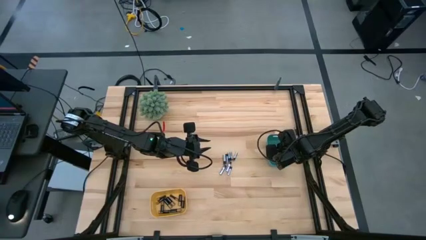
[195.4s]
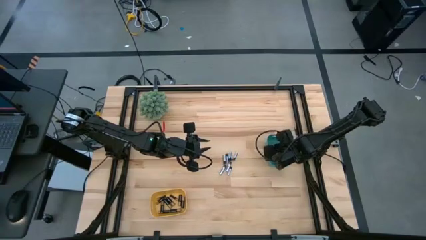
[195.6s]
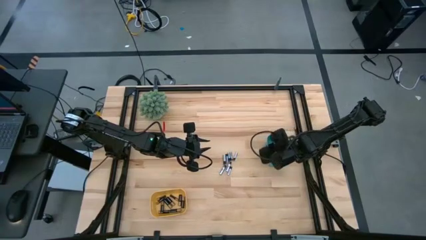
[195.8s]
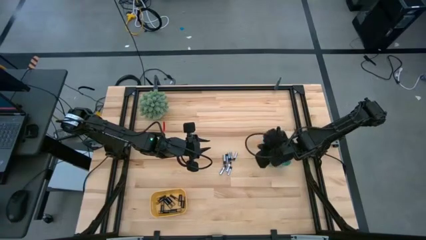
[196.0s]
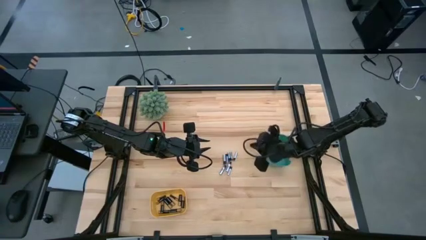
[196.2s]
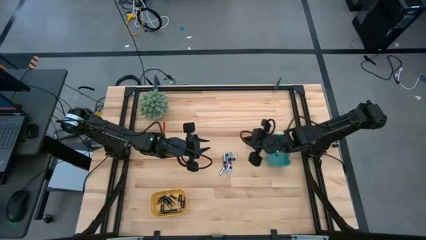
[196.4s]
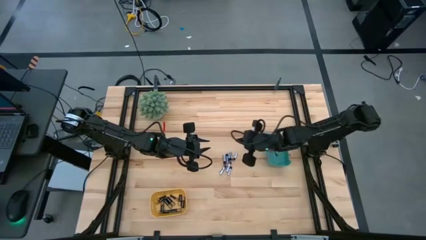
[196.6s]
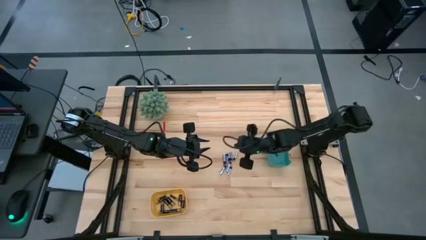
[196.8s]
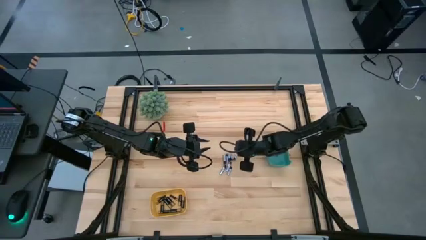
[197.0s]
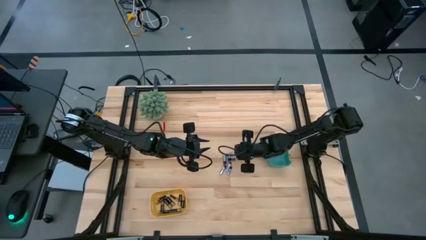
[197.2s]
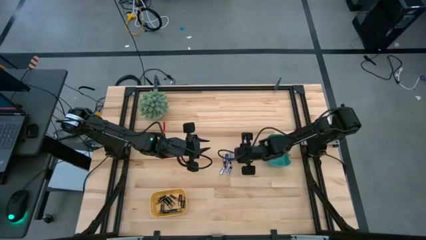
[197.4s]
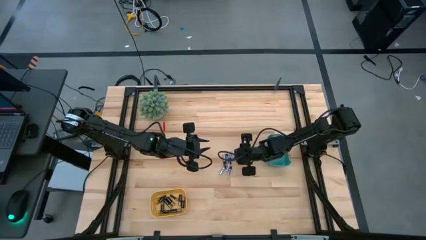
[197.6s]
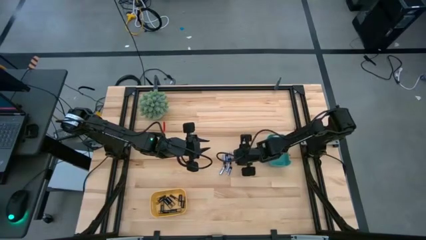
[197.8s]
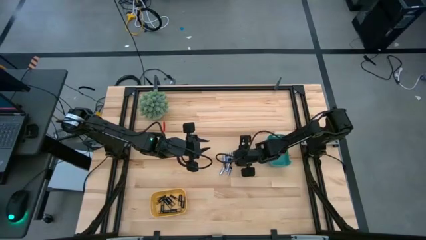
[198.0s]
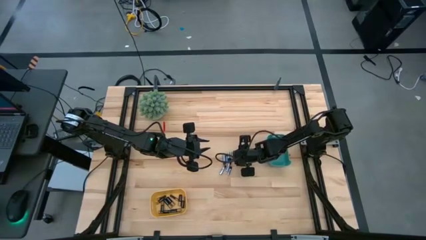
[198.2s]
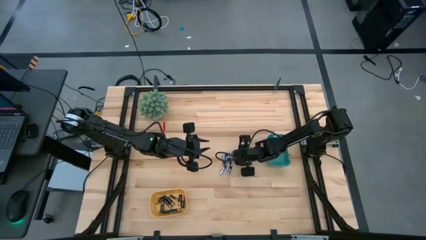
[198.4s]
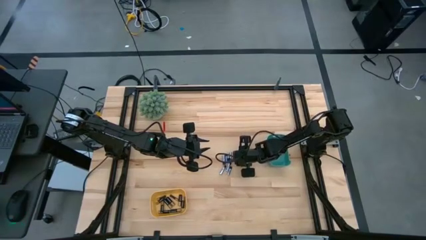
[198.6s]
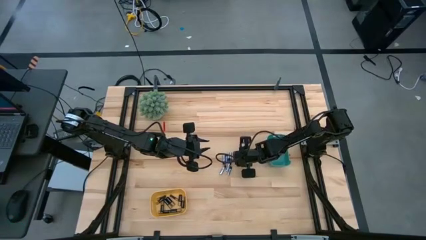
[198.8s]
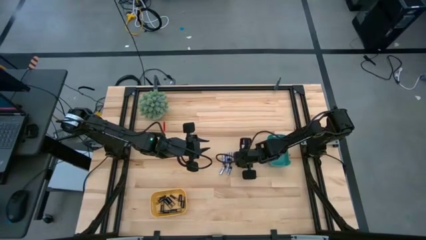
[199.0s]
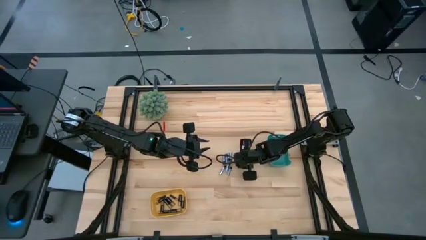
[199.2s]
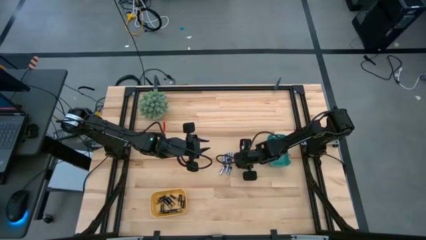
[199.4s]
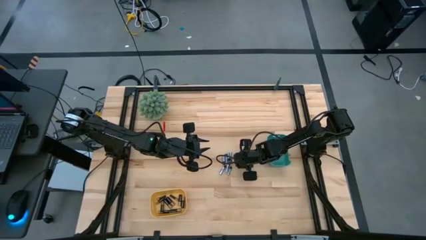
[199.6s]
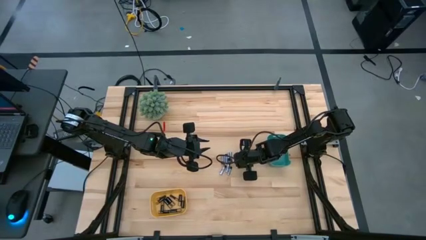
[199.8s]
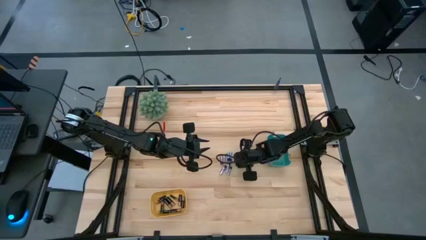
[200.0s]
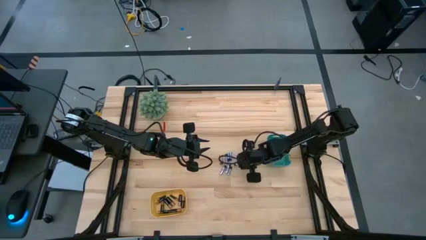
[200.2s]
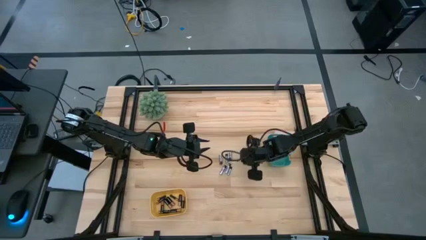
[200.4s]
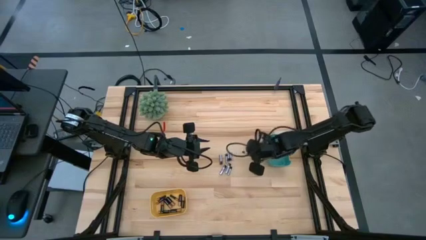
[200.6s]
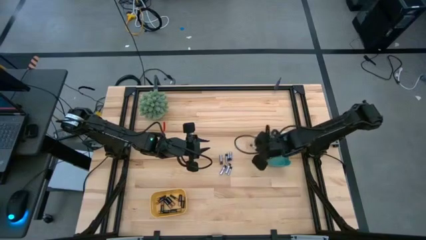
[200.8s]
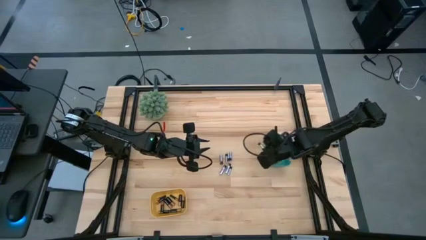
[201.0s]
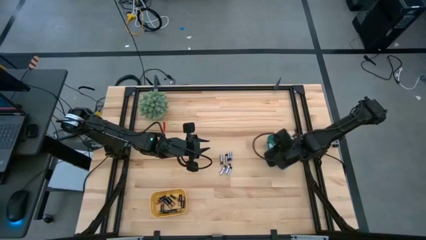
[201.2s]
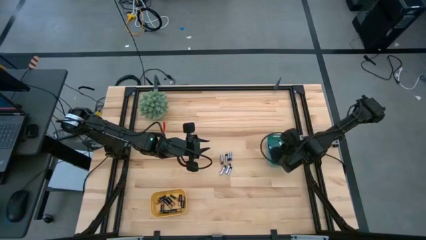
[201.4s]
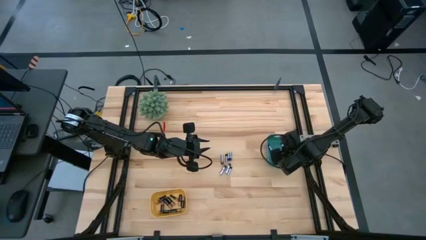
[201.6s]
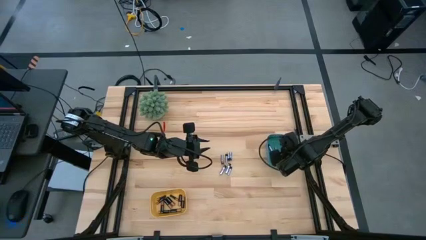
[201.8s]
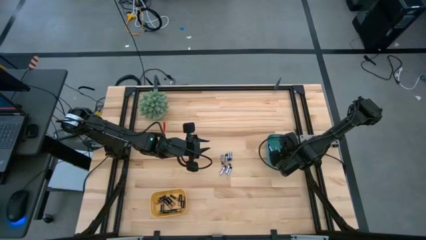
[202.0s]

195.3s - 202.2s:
Task: Sort batteries
Put the silver battery into the green bin

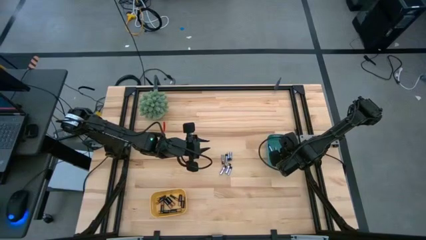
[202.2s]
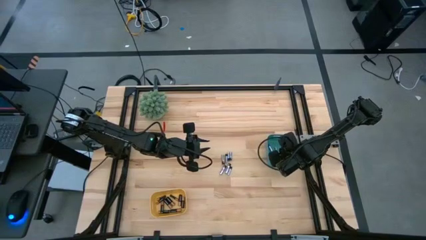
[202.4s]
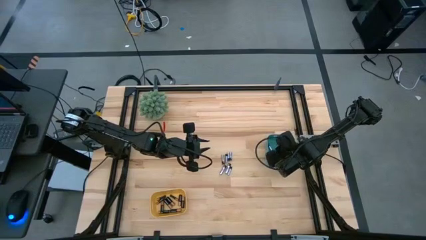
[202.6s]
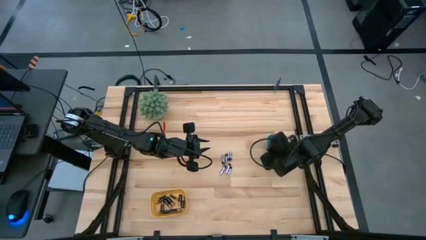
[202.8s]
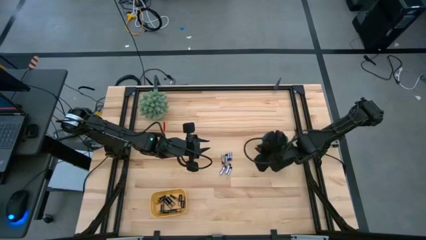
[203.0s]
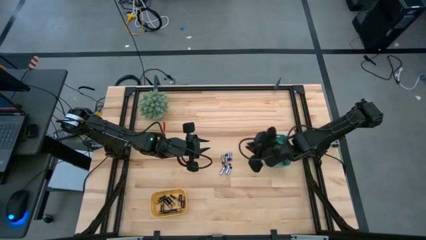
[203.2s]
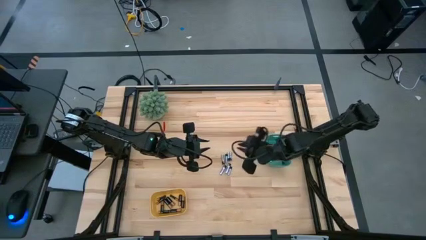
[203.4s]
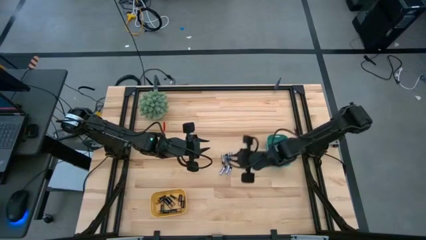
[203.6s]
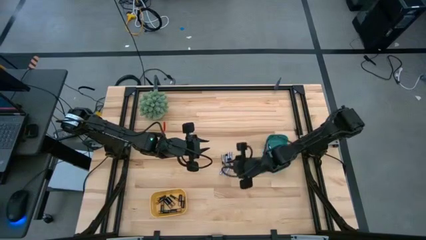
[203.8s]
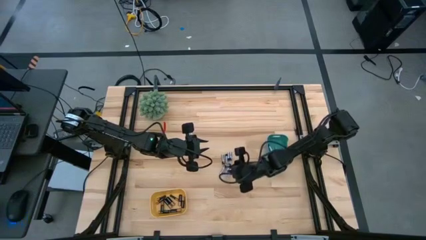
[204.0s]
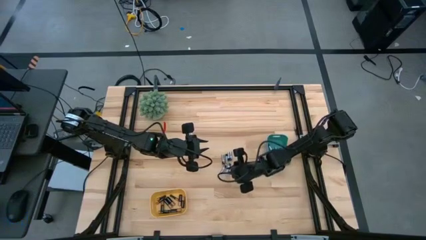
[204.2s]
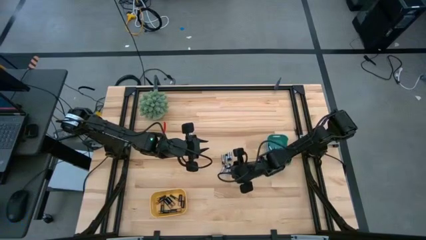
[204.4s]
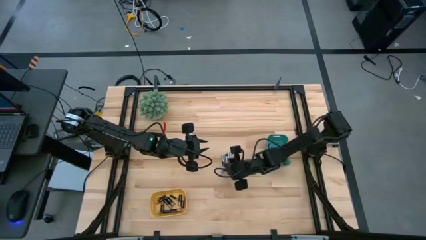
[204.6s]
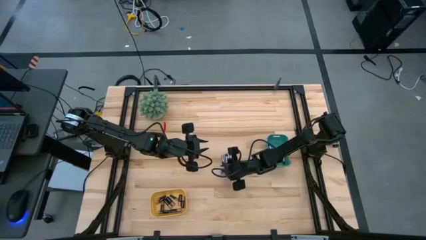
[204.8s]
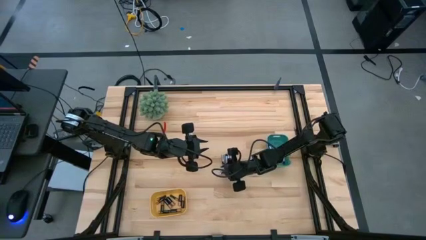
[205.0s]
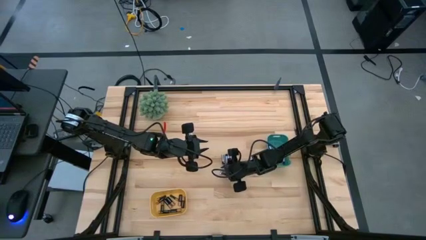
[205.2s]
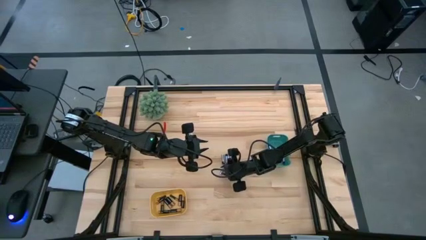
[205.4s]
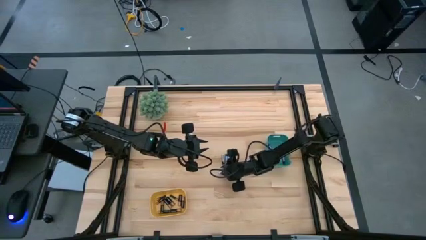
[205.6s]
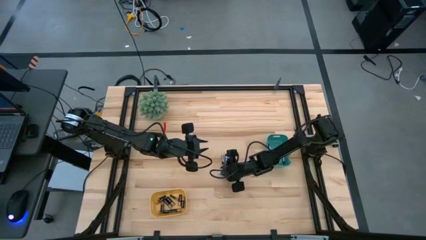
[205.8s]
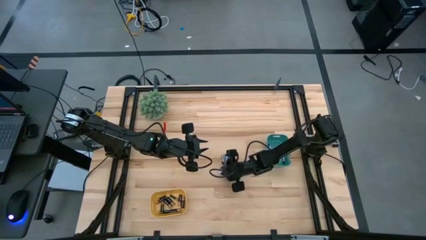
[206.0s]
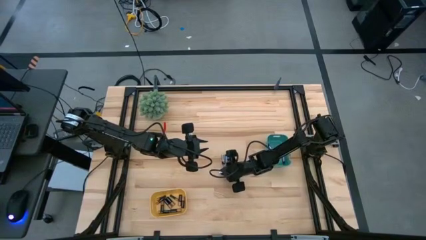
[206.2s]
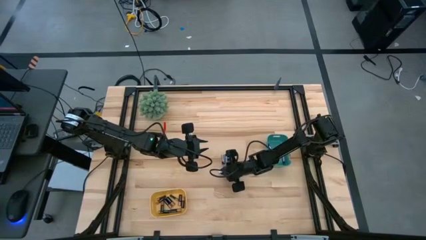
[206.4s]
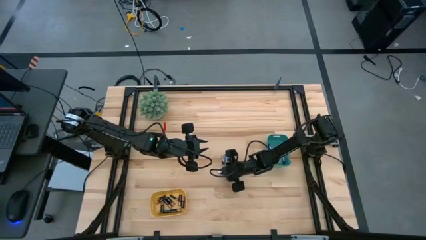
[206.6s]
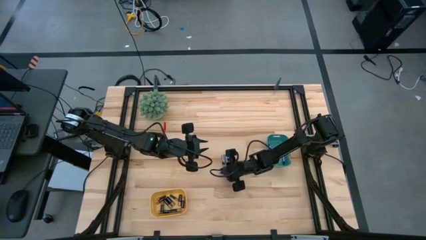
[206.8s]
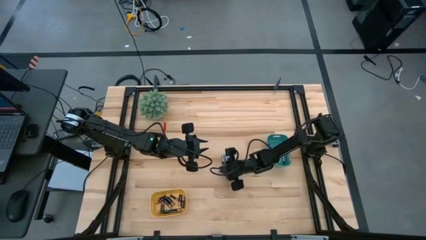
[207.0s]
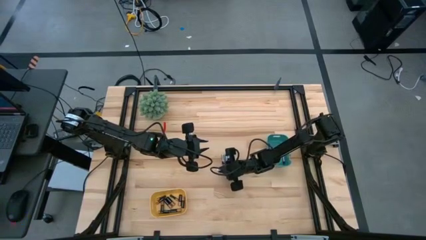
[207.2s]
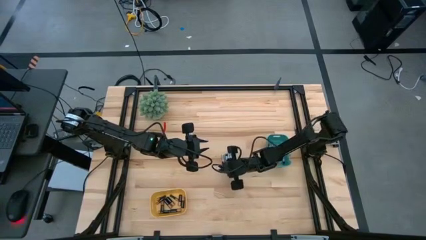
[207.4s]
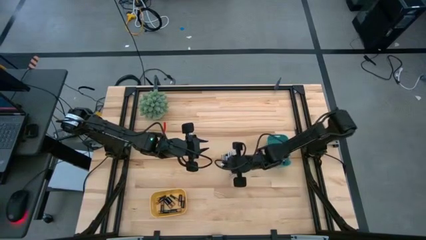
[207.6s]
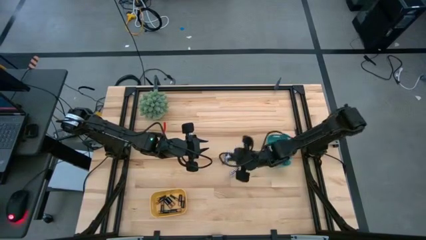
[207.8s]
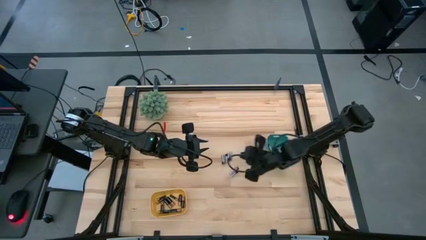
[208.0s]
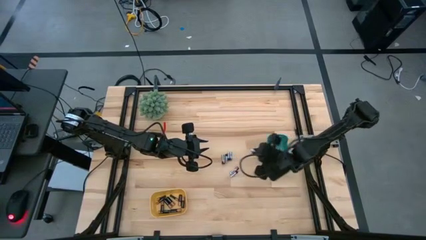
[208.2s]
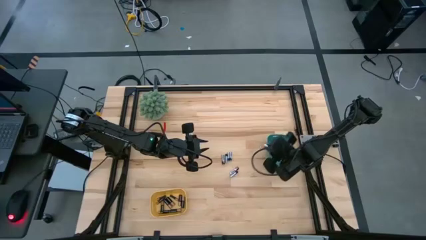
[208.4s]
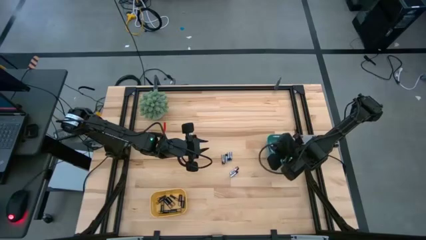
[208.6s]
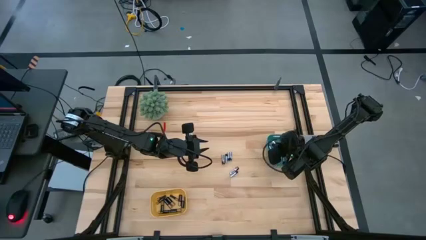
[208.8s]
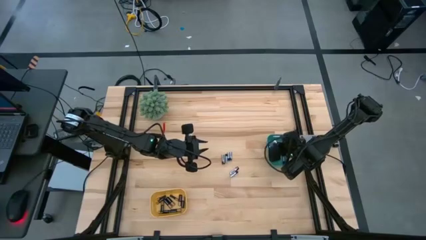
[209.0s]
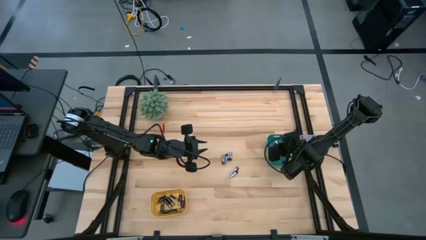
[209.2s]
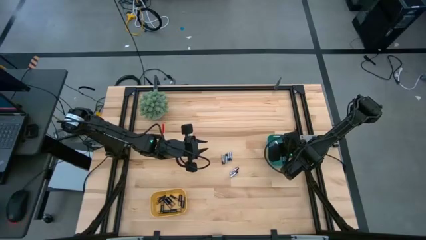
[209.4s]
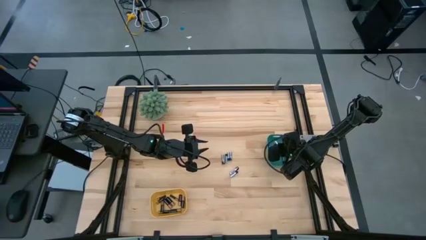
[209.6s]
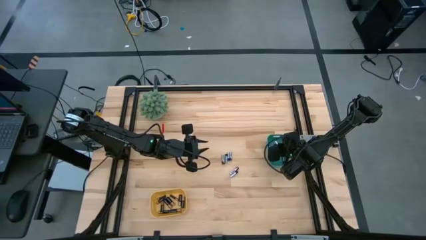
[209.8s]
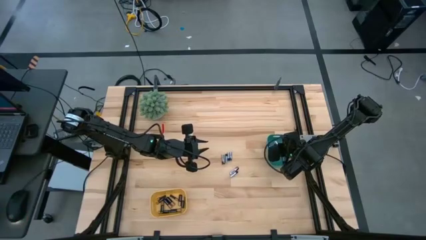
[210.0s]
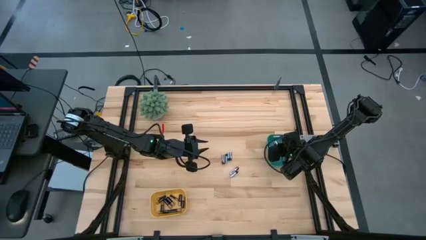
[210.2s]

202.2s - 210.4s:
Put the silver battery into the green bin
